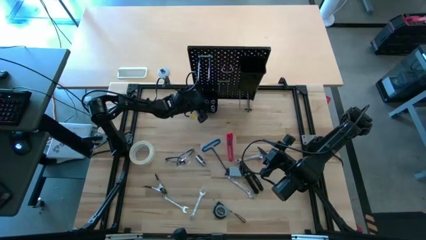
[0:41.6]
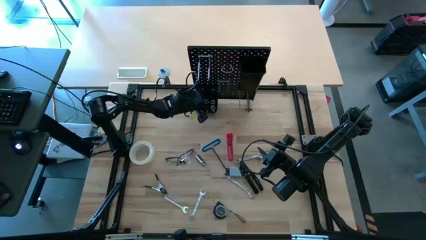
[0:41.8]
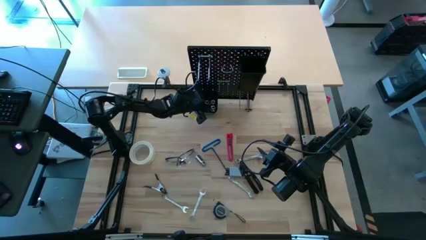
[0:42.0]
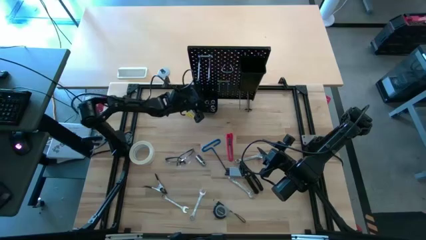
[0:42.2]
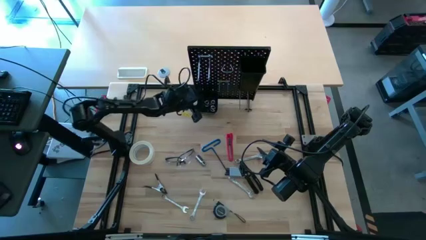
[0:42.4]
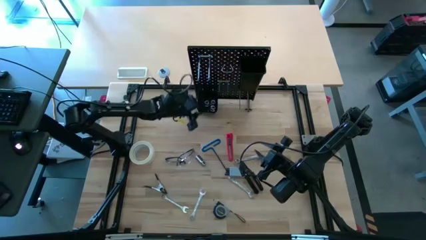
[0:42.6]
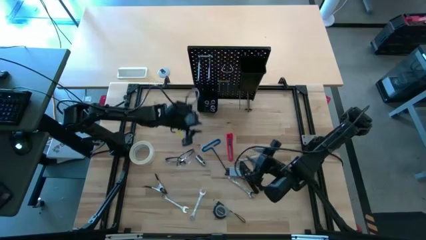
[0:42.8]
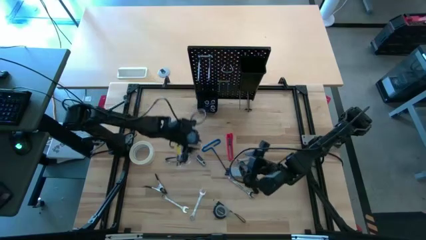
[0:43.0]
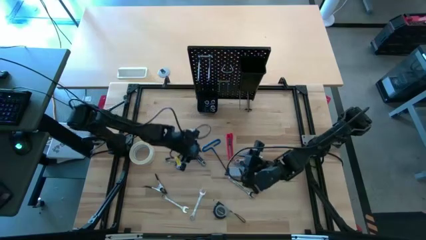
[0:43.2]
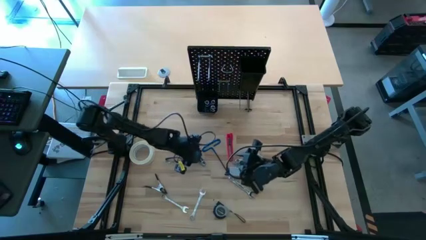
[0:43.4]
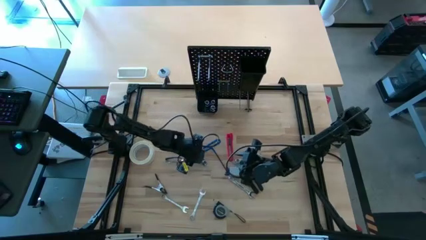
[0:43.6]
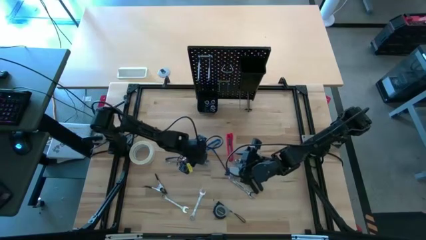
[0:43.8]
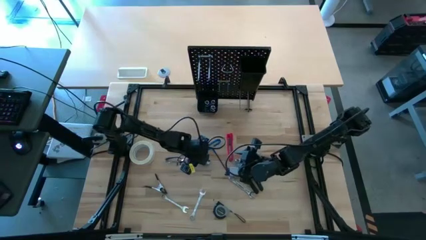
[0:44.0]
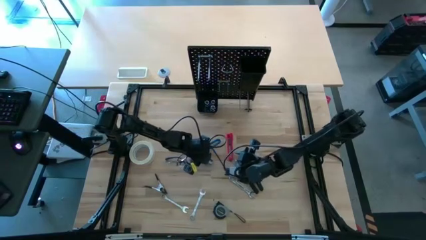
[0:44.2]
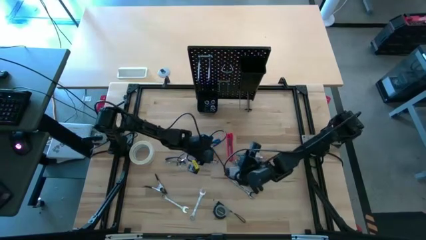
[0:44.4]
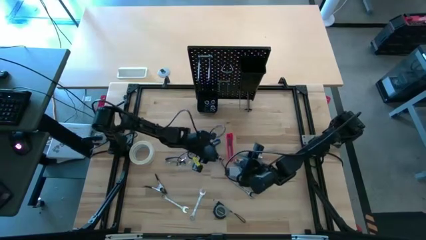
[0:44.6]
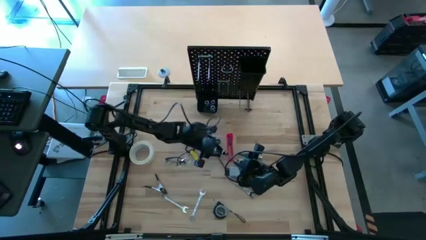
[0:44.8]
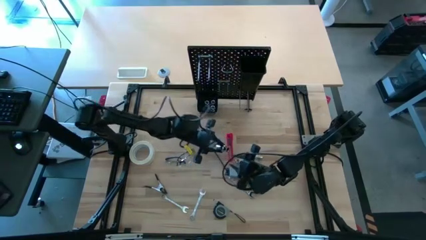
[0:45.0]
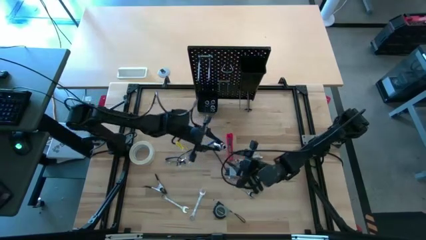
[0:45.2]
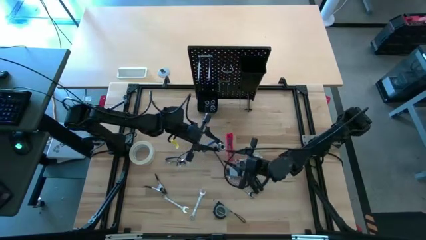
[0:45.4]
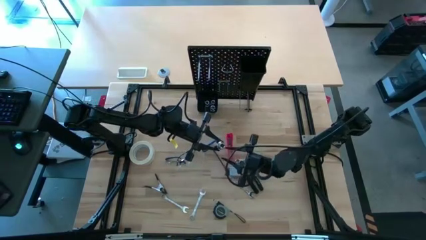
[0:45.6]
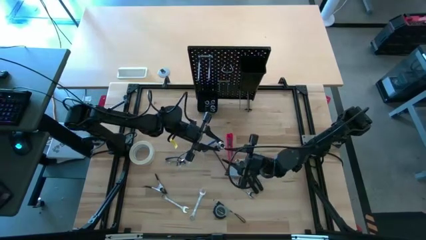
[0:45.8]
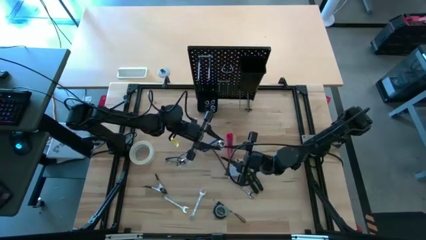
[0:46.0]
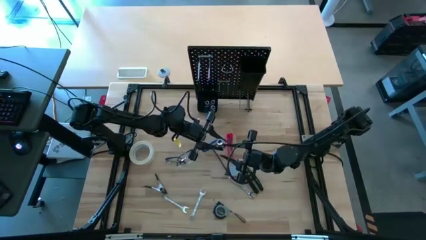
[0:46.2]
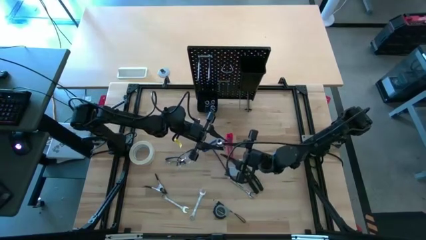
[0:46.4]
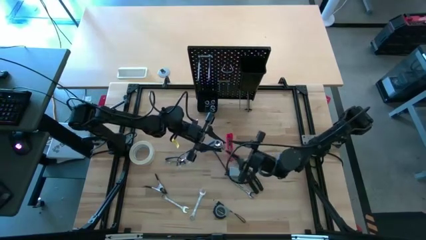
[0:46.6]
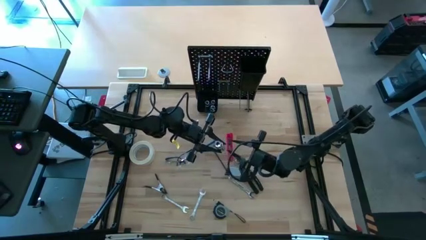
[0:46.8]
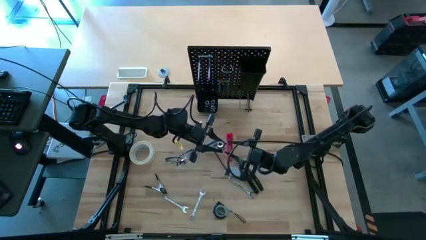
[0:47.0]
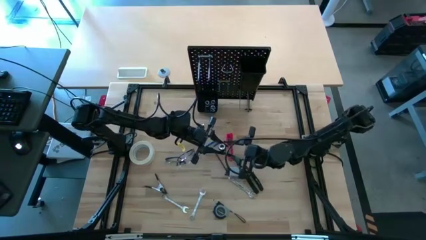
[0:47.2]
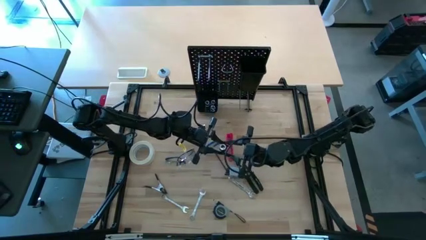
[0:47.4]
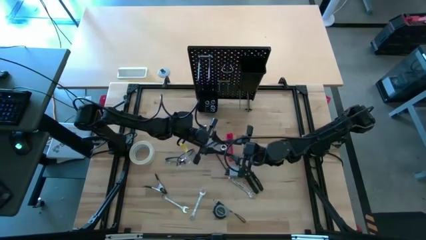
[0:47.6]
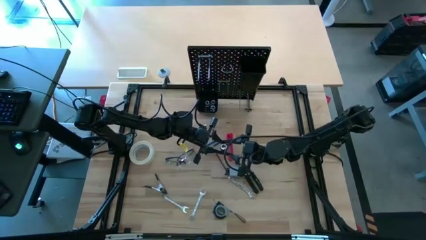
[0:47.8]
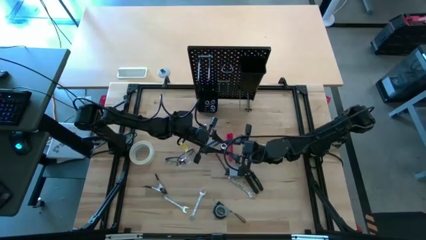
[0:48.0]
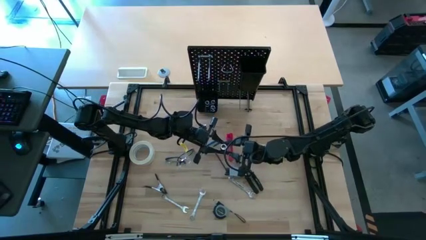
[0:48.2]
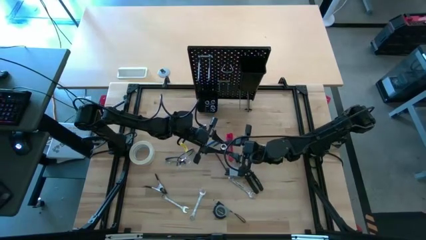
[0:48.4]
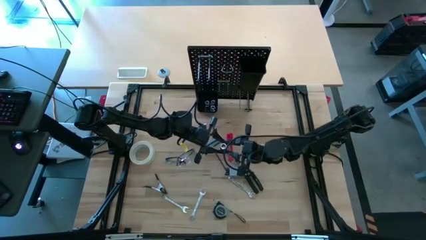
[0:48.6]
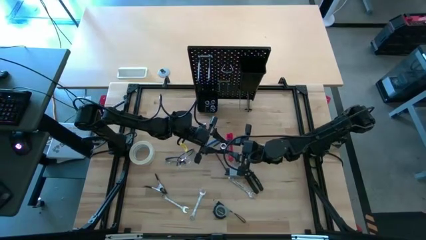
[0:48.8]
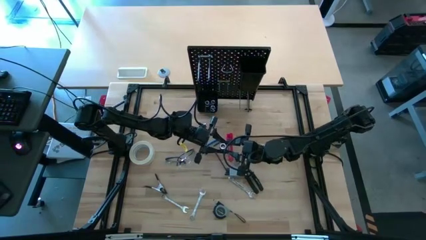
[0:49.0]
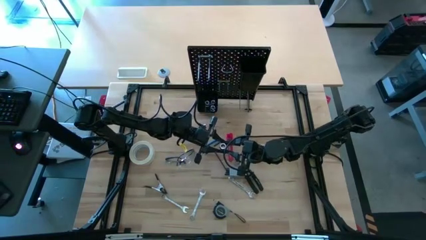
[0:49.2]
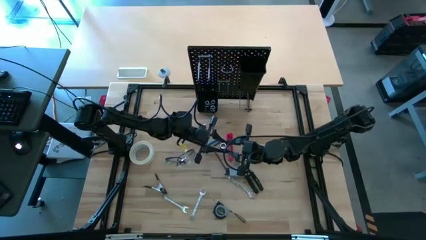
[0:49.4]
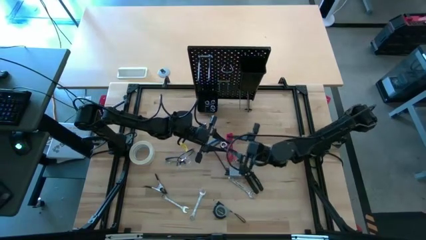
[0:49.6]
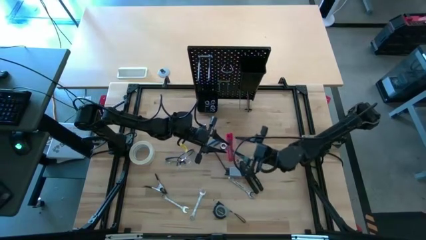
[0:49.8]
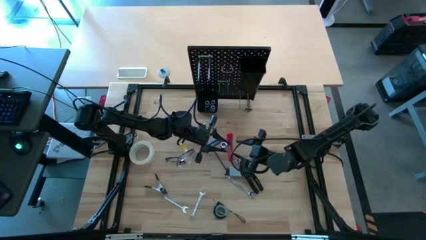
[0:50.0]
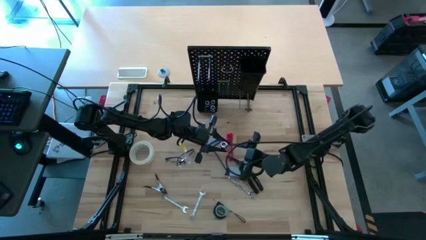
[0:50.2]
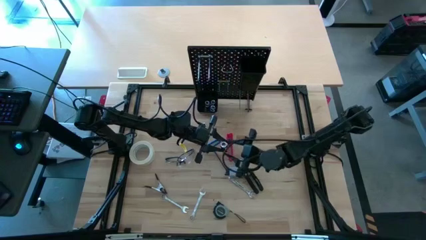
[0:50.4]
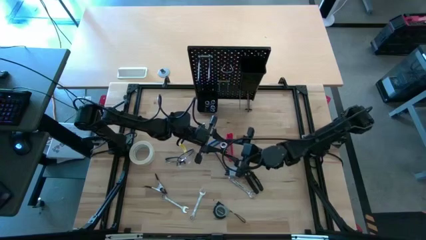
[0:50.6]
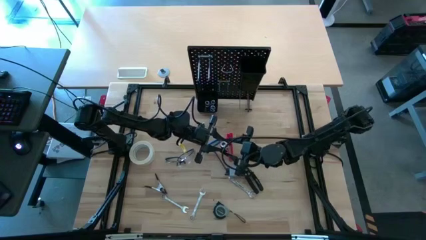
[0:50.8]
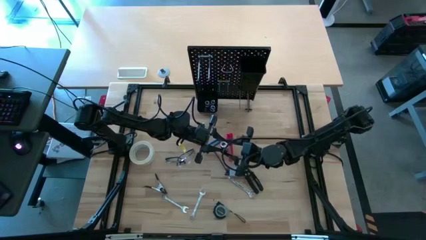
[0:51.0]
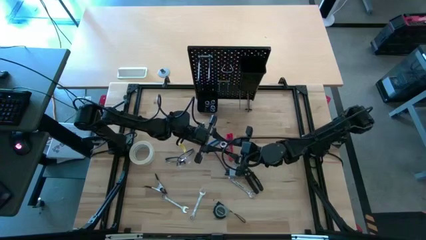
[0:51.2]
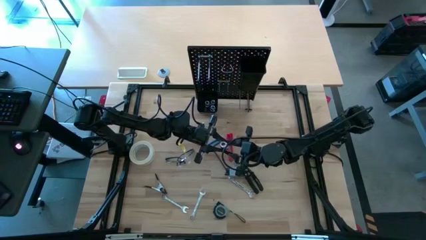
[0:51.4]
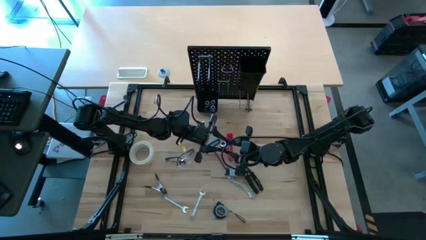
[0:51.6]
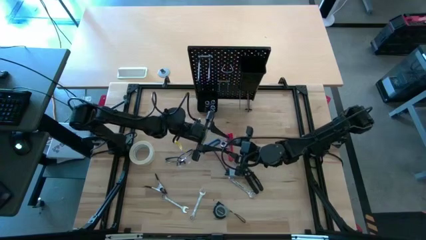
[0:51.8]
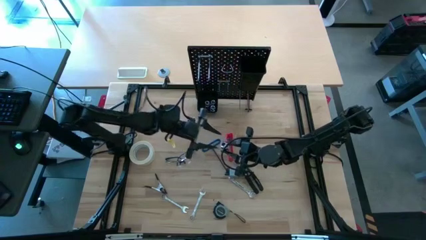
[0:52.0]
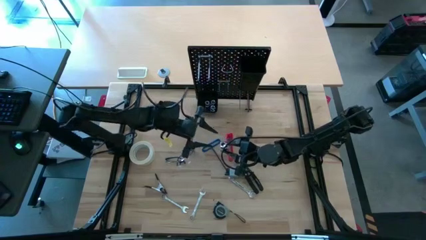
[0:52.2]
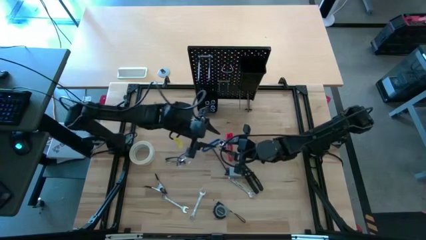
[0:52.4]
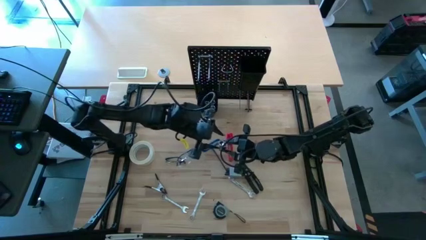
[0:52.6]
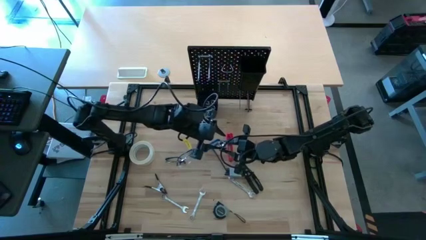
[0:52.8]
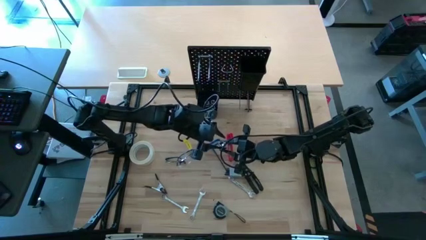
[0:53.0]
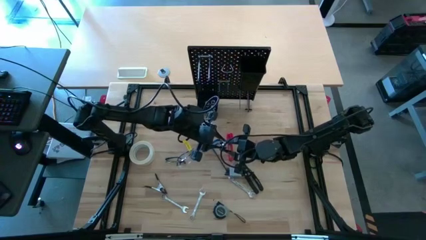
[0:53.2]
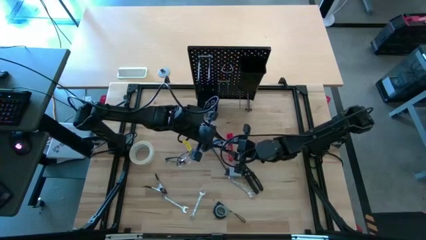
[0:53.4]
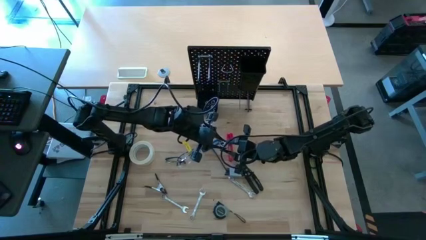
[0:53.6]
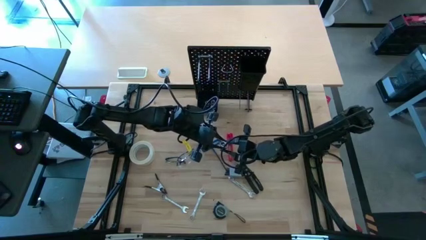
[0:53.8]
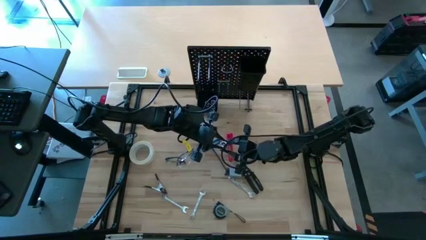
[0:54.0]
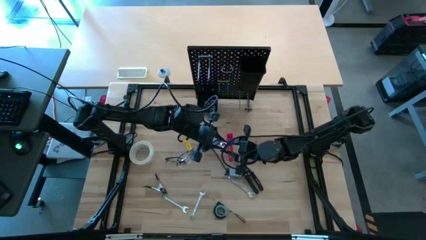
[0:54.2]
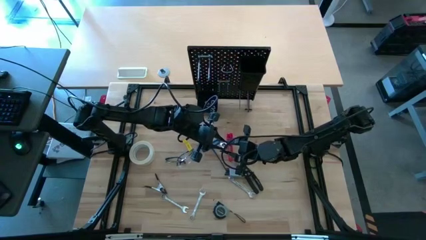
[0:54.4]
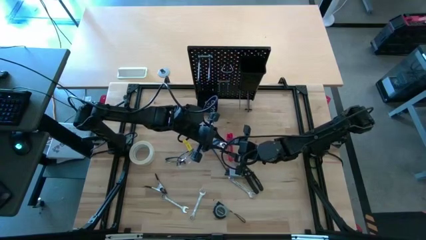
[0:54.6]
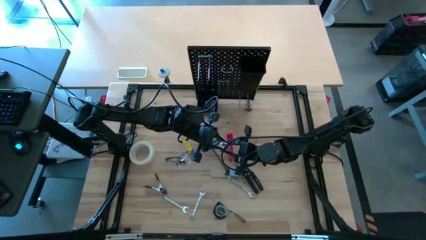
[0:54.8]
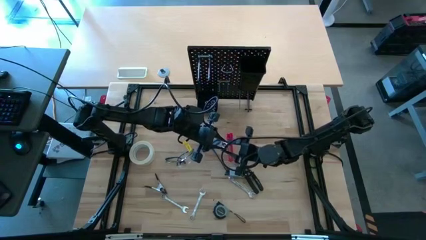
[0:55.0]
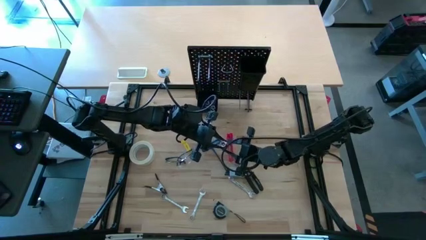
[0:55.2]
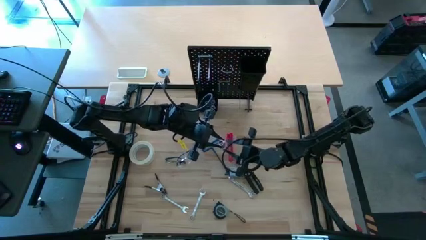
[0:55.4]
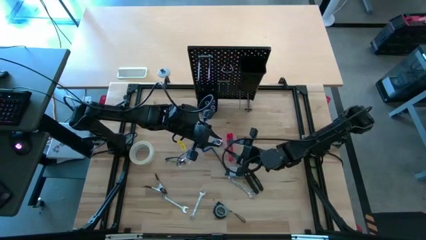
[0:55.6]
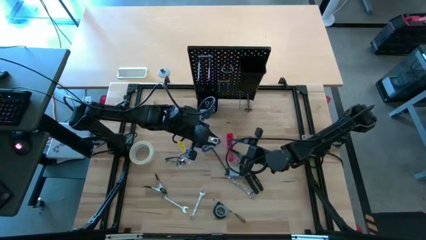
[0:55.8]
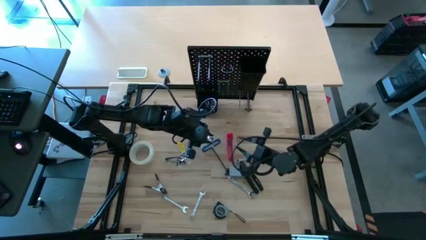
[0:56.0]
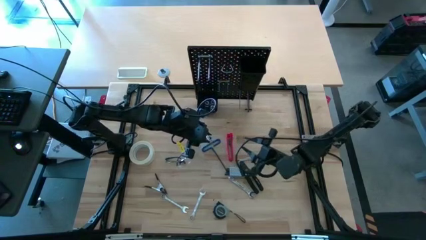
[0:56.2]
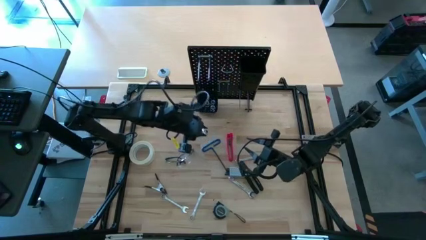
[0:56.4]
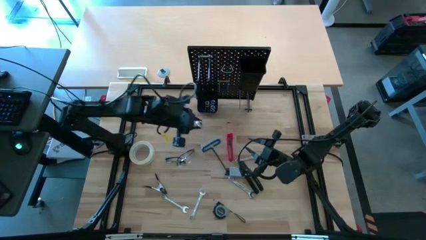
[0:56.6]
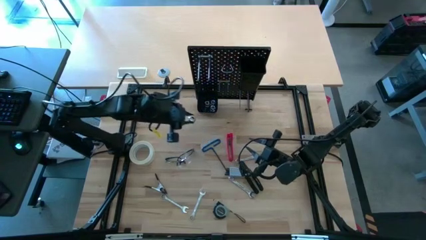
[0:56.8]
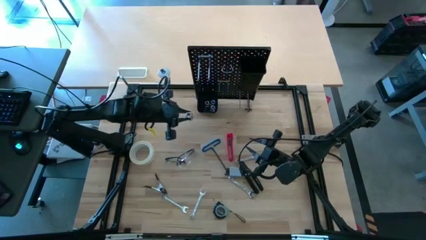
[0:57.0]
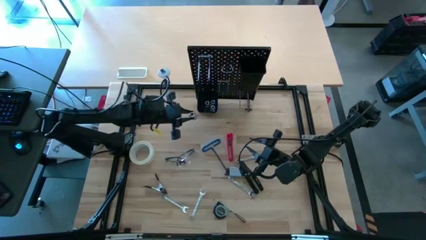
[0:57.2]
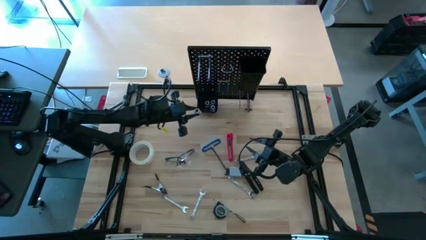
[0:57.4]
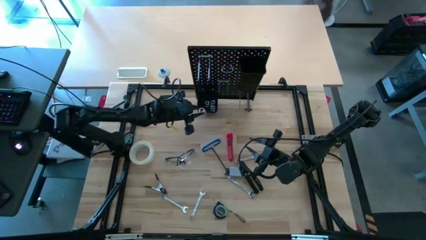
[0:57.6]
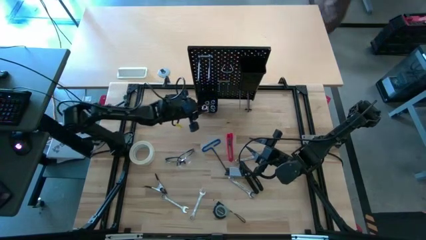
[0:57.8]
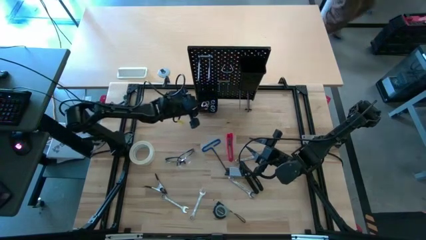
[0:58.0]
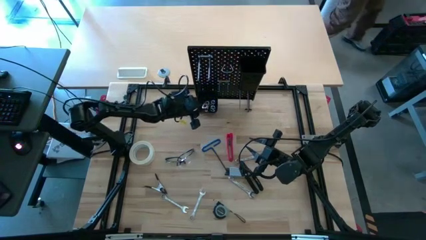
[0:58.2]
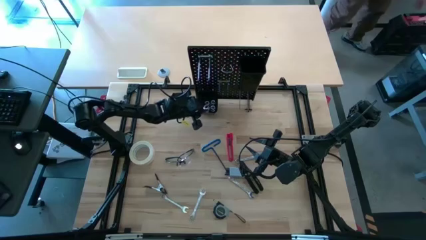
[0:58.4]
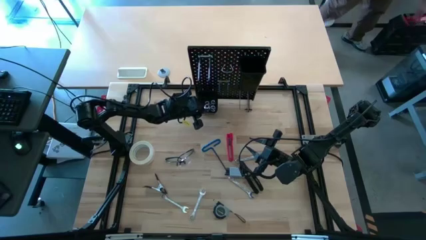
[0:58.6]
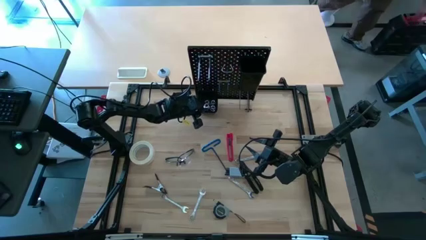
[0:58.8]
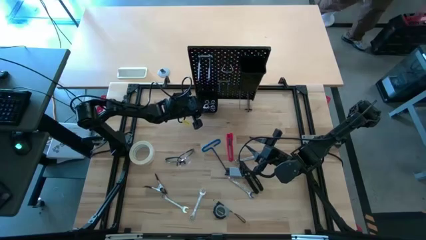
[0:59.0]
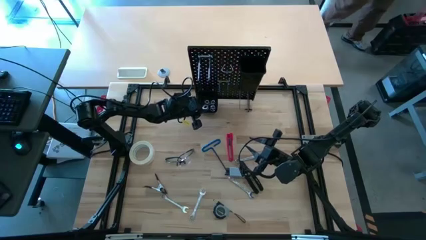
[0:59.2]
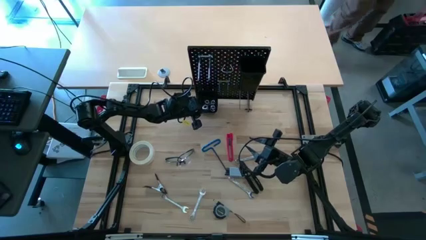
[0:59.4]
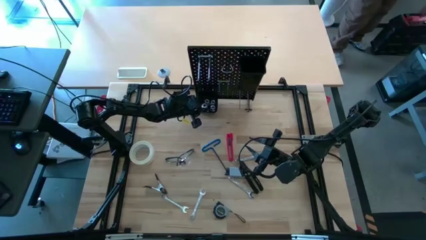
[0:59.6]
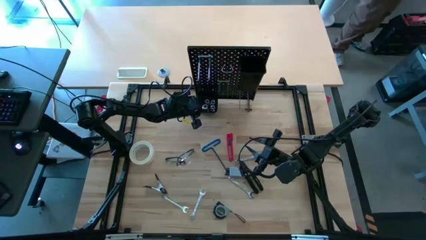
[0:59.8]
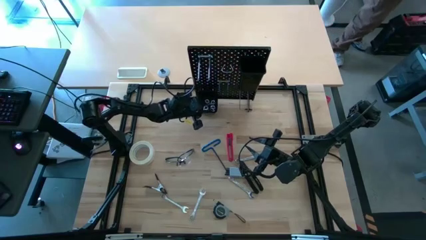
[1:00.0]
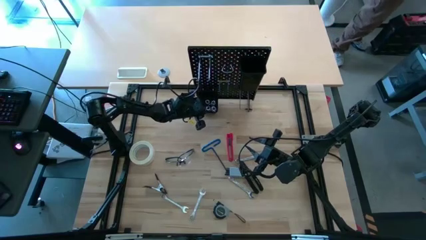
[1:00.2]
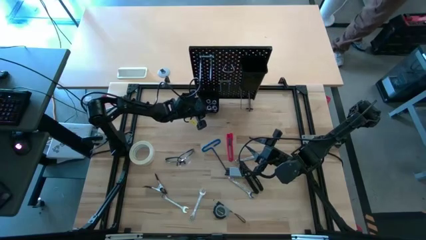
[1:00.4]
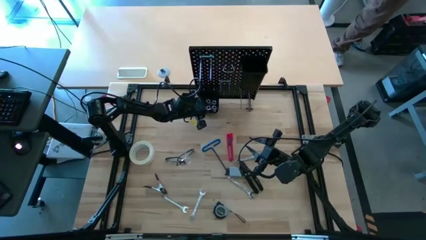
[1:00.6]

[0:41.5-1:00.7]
Task: Hang tools onto peg board
Put the socket into the bottom bin on the peg board
